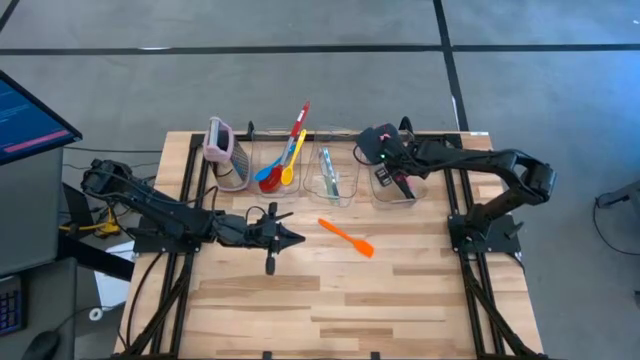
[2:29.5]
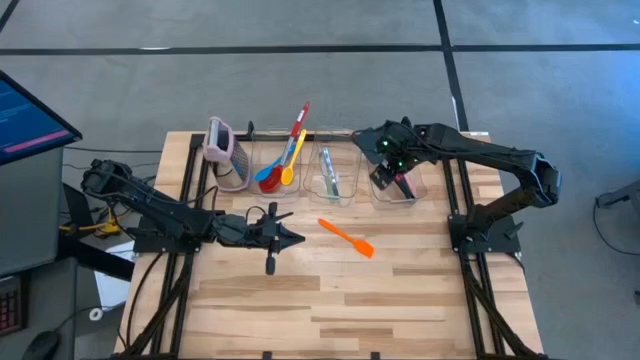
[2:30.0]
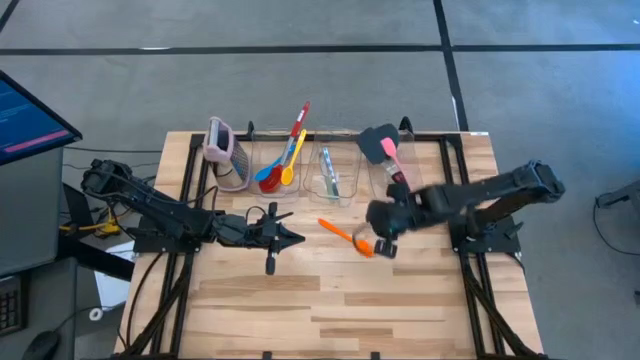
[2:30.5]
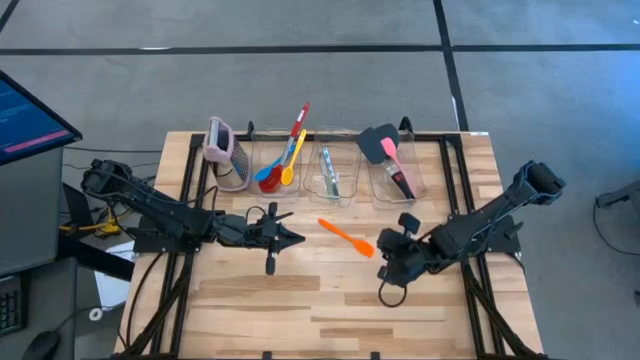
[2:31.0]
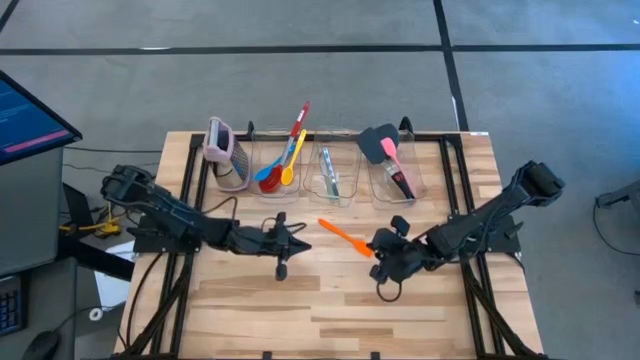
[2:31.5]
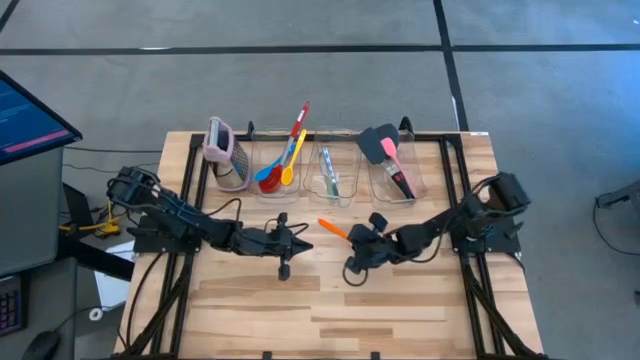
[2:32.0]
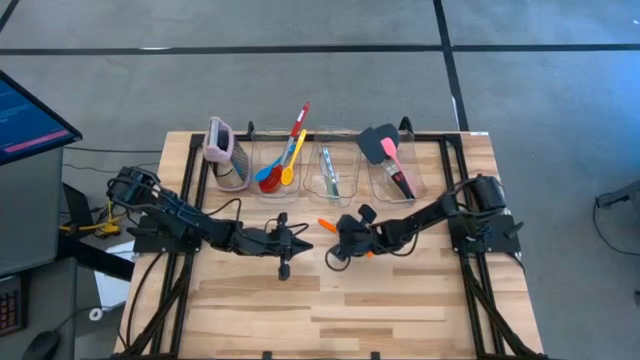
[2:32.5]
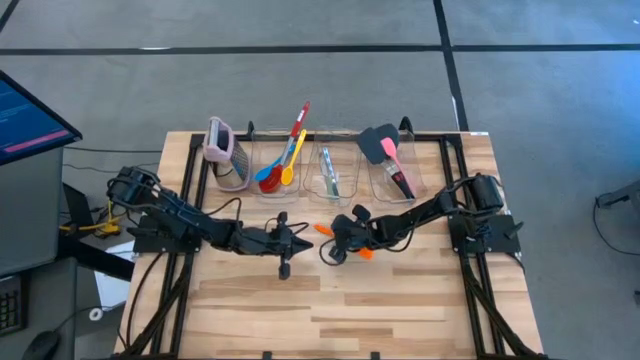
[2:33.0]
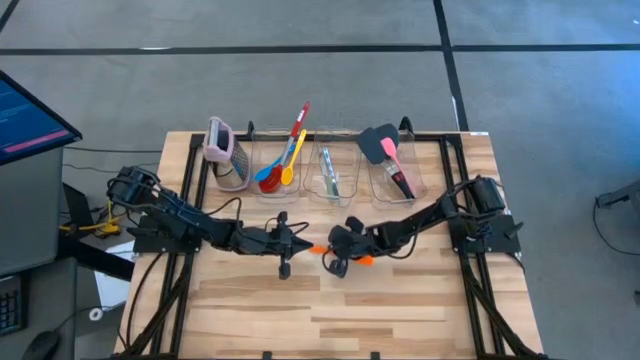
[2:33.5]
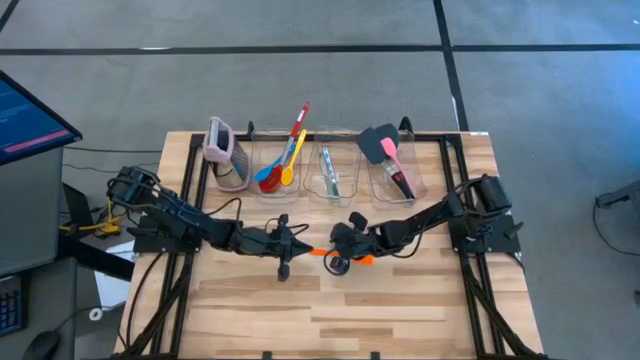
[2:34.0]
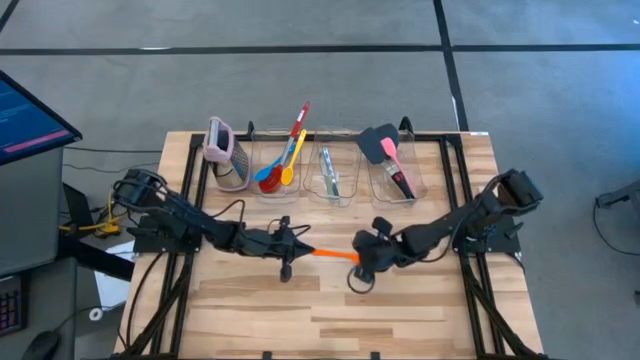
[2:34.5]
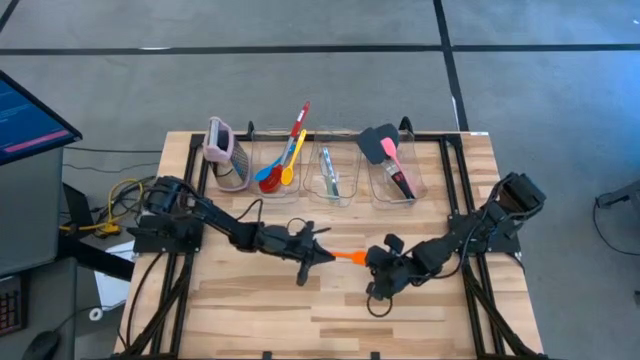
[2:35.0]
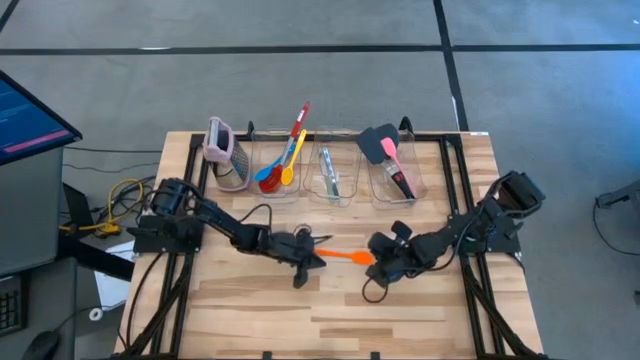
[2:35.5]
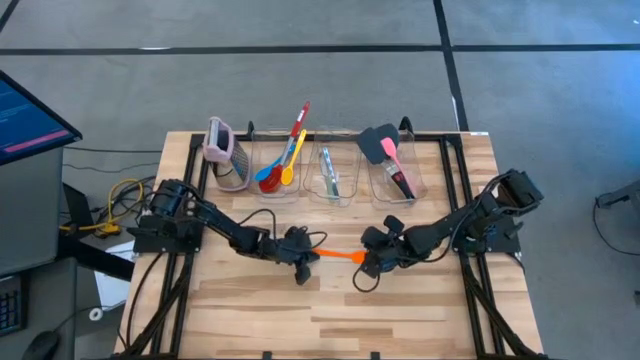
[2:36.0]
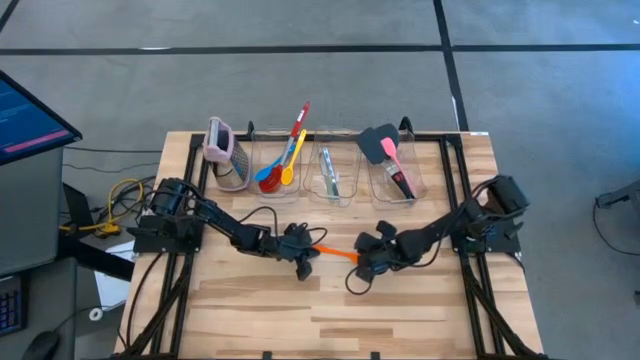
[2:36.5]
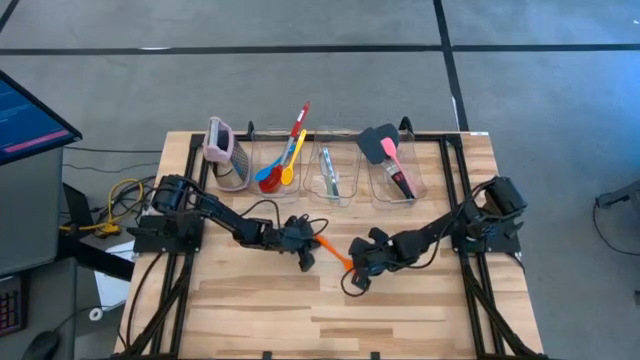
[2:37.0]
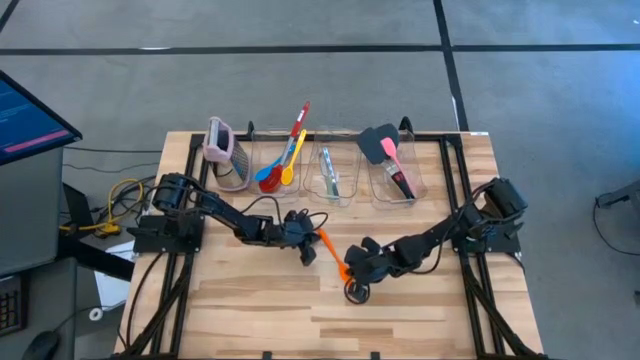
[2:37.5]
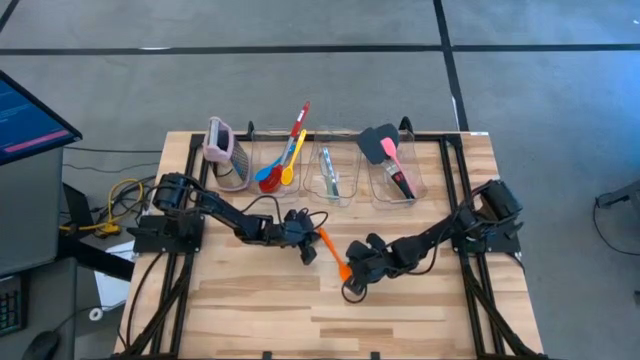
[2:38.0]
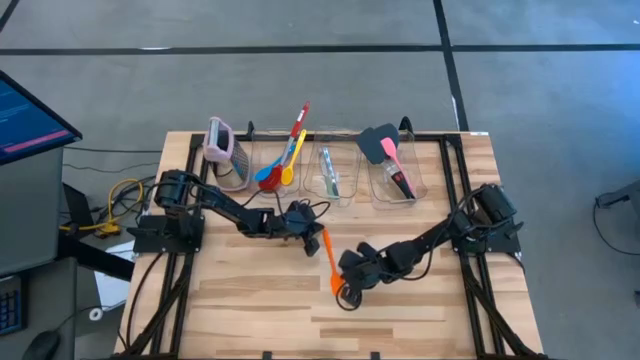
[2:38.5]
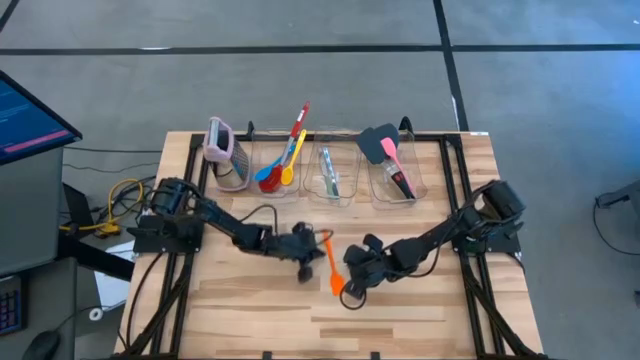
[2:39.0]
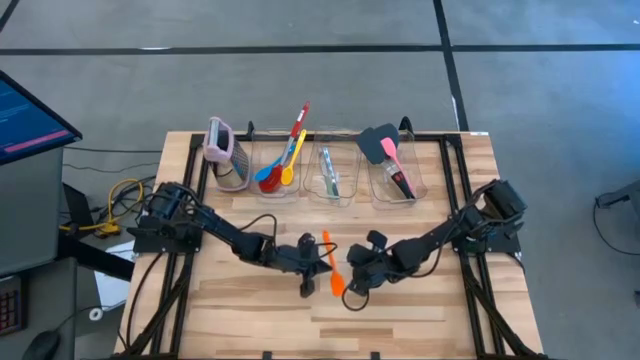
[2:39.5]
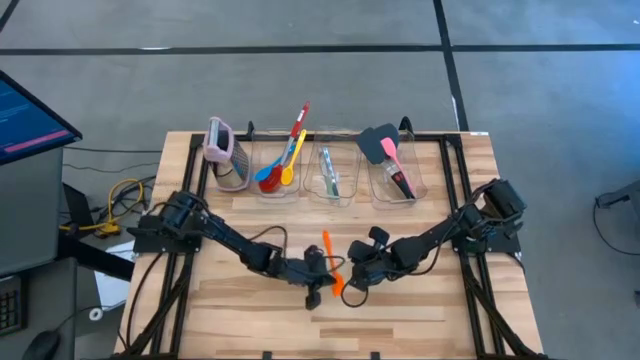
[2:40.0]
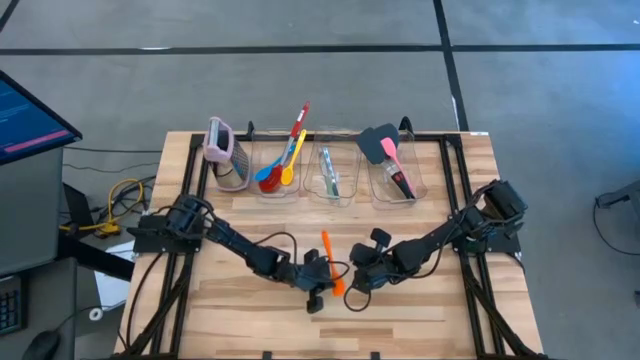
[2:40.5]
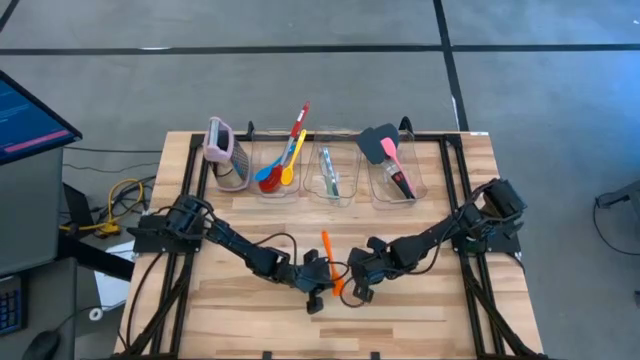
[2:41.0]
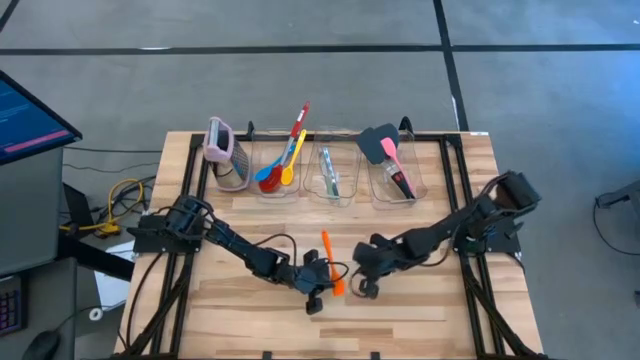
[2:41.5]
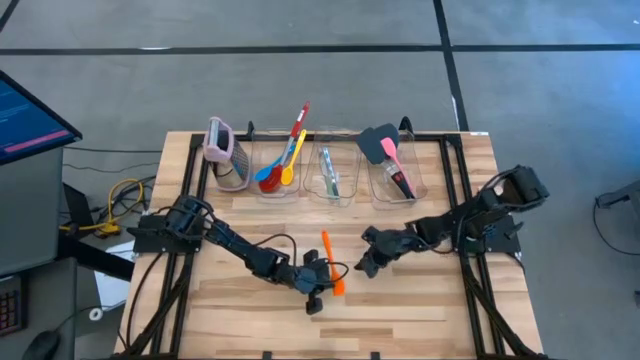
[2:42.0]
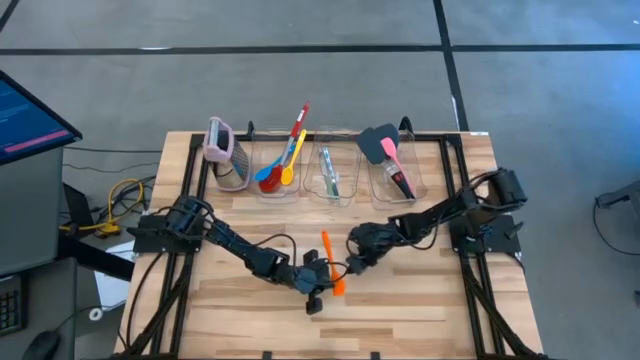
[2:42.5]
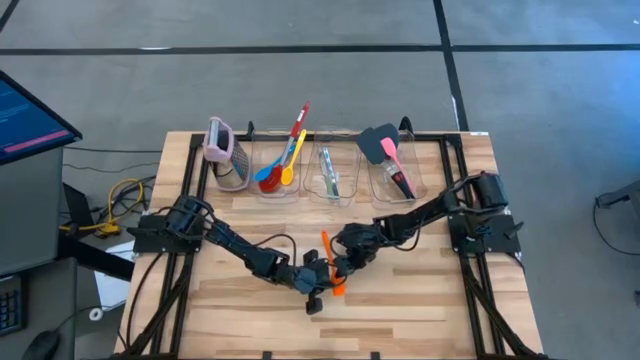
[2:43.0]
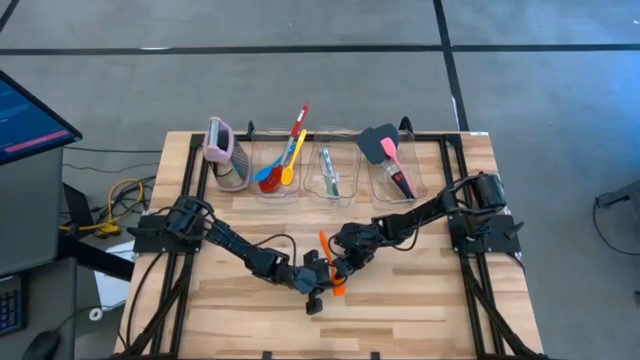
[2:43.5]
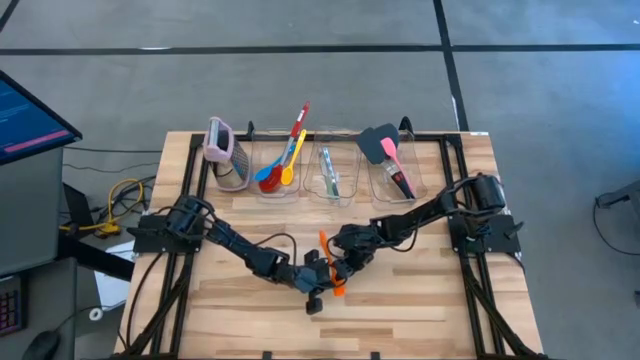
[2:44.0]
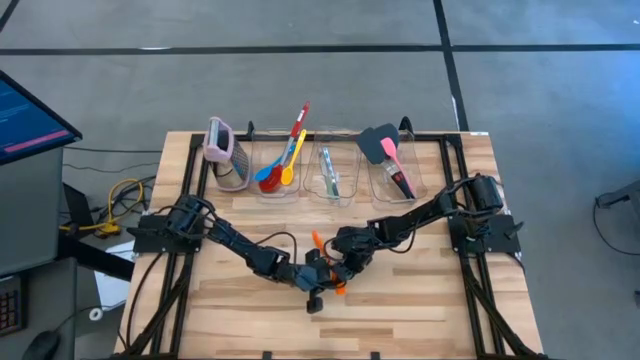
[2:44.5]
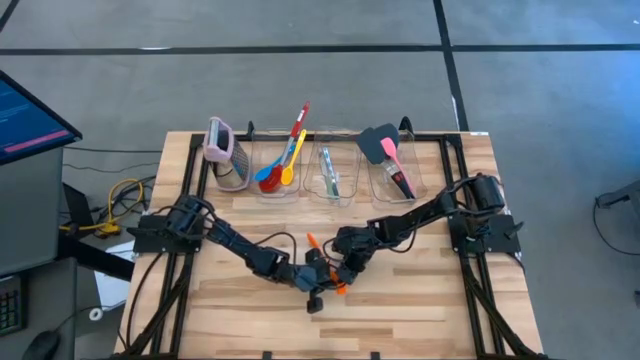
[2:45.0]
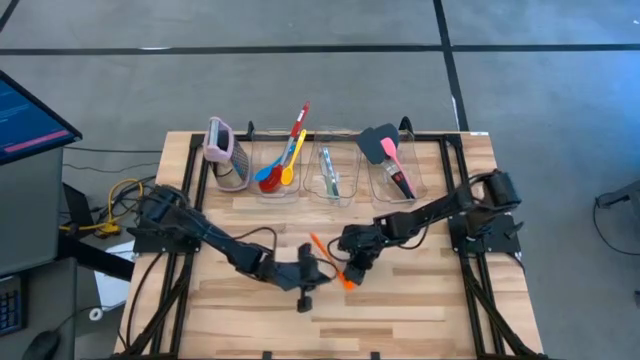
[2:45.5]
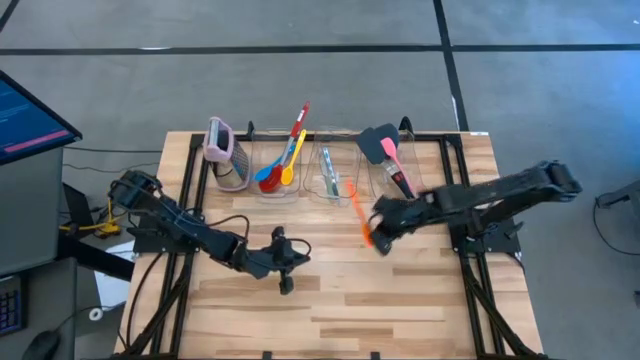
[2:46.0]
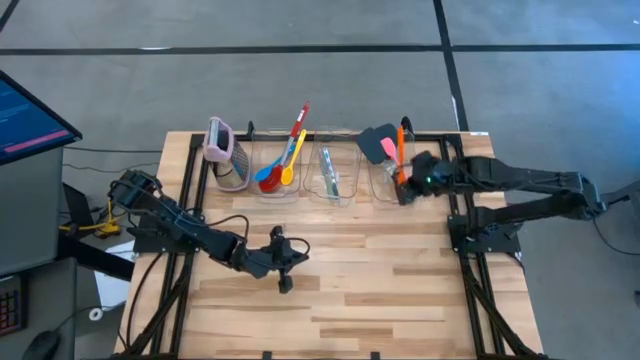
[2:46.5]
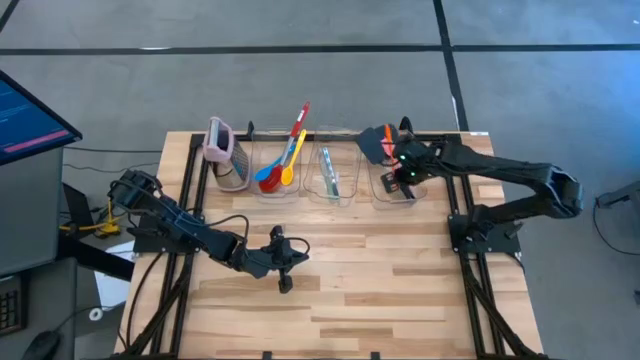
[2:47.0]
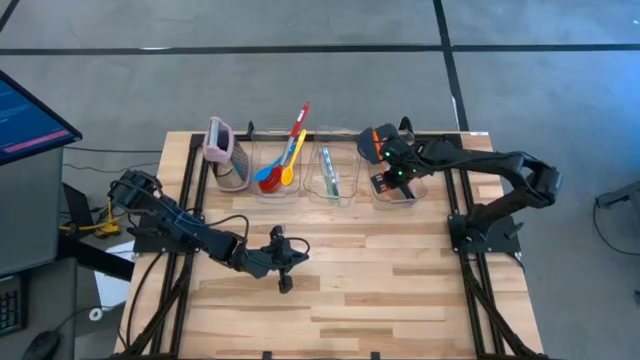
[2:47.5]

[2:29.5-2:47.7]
Task: Pick & Place Kitchen Items
Put the orange spatula into the right transparent bin

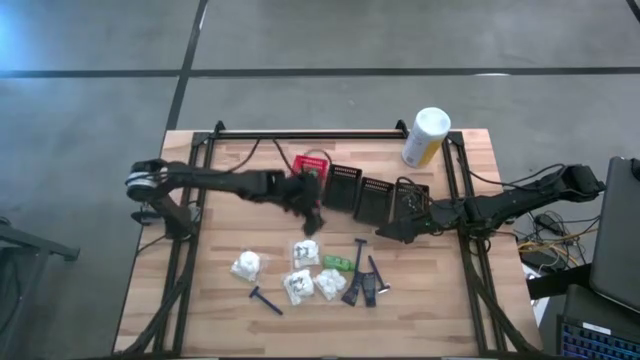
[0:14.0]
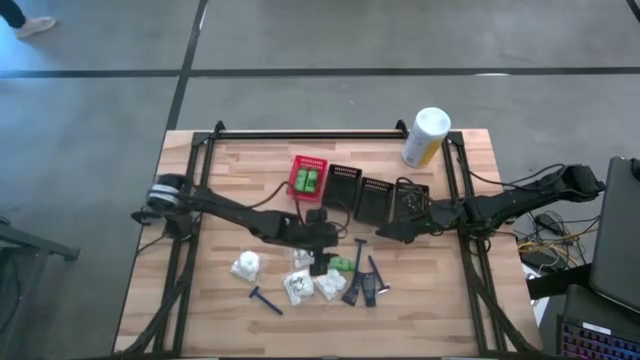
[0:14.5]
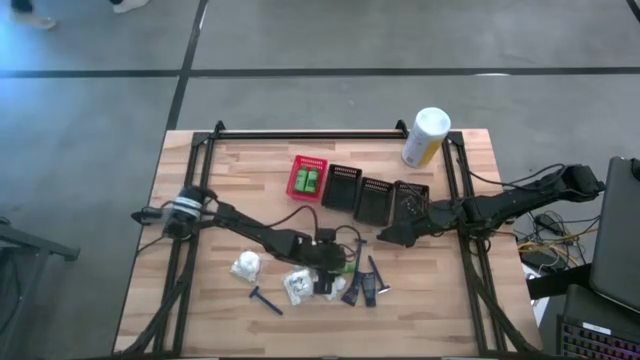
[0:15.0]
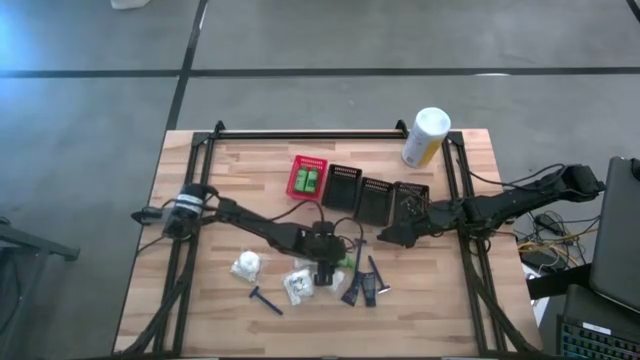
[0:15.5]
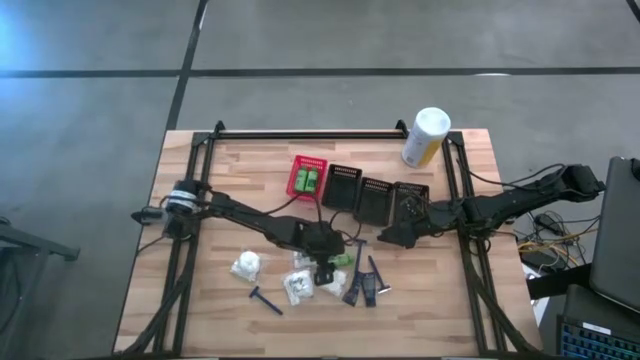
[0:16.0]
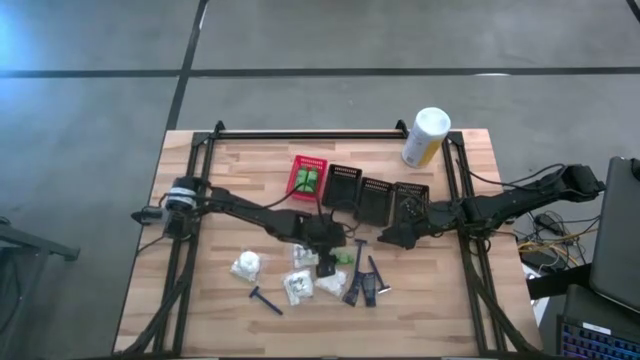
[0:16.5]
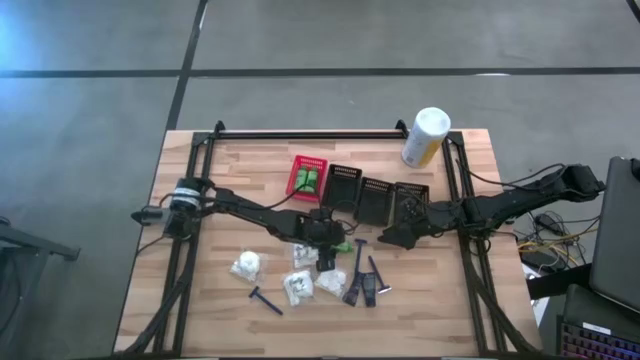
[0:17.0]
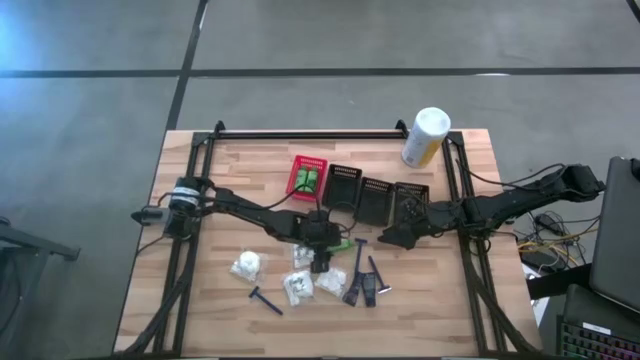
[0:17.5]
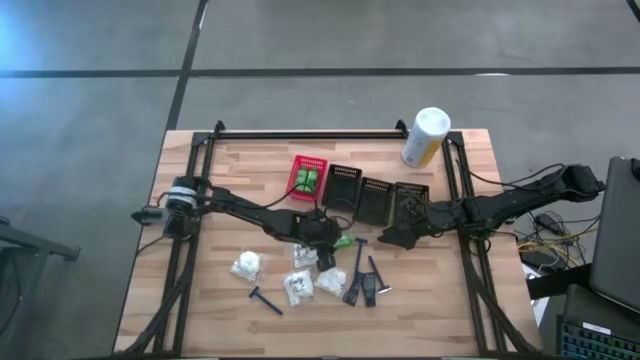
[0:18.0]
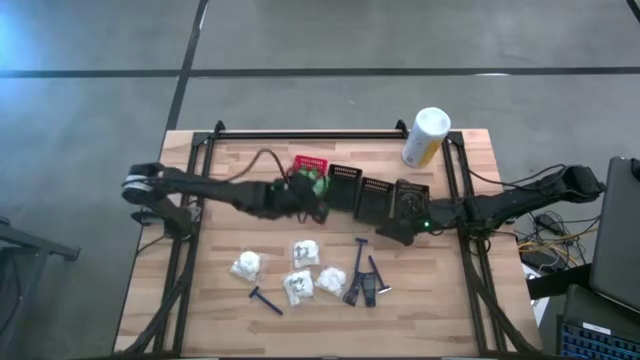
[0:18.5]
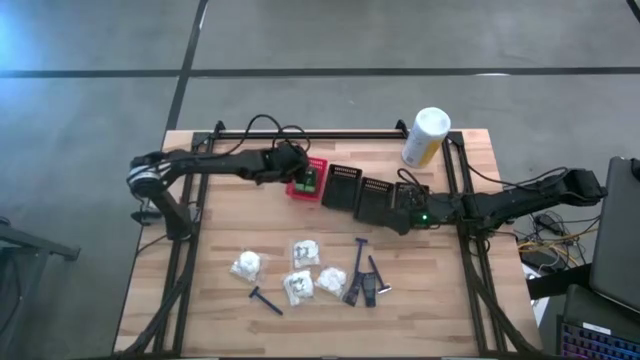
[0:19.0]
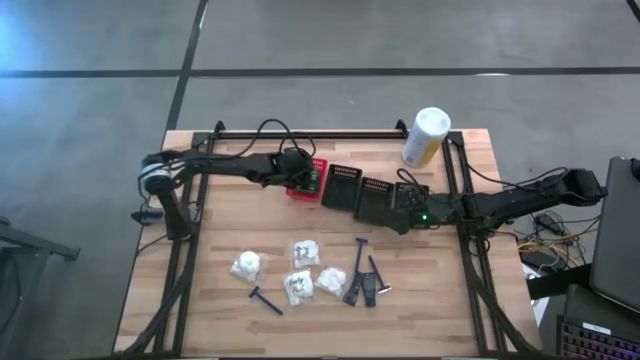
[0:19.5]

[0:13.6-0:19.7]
Task: Pick & Place Travel size toiletries
Put the shampoo into the red bin
